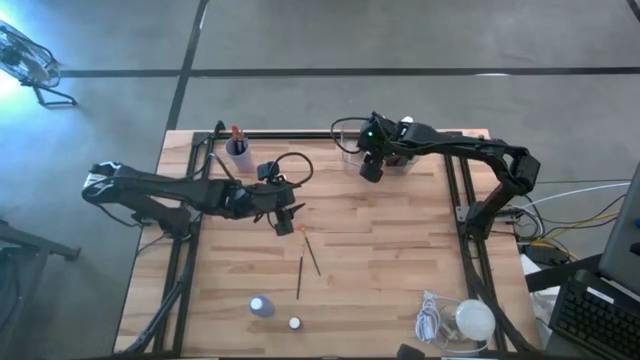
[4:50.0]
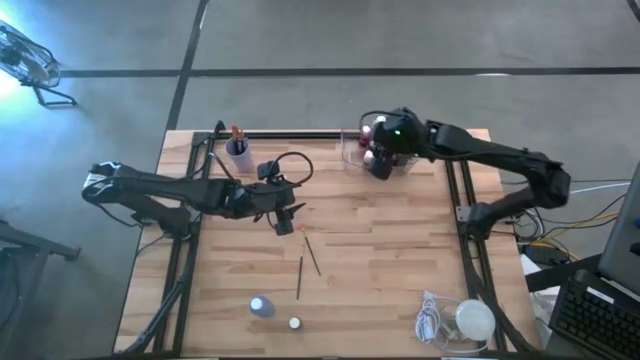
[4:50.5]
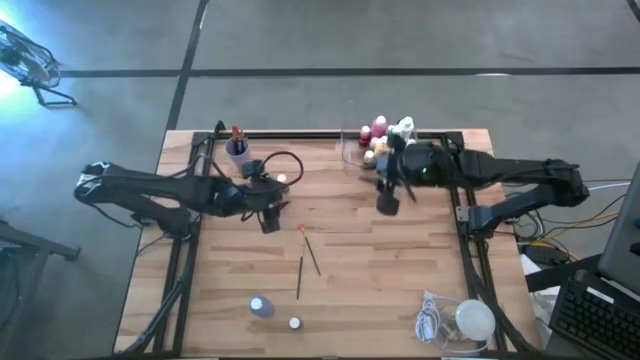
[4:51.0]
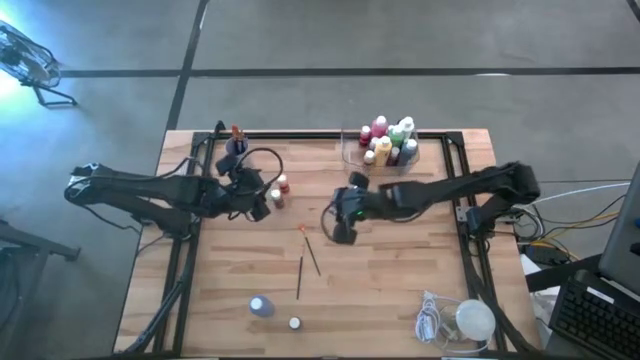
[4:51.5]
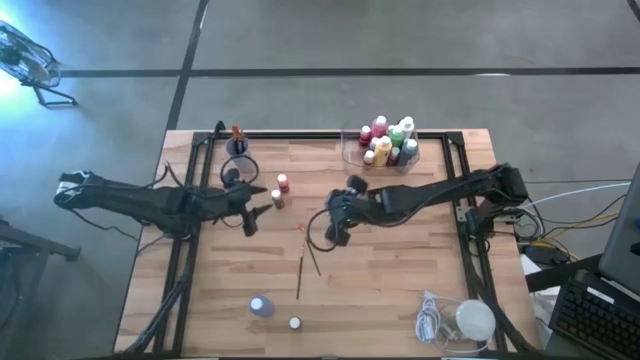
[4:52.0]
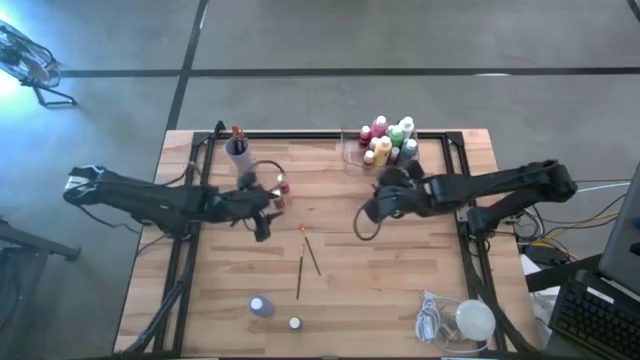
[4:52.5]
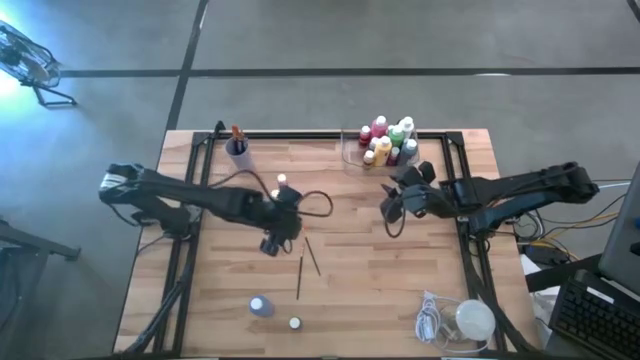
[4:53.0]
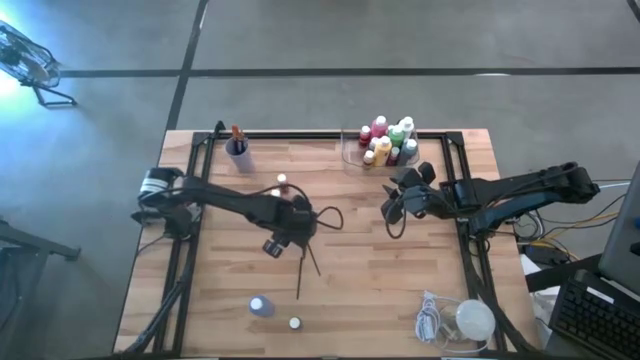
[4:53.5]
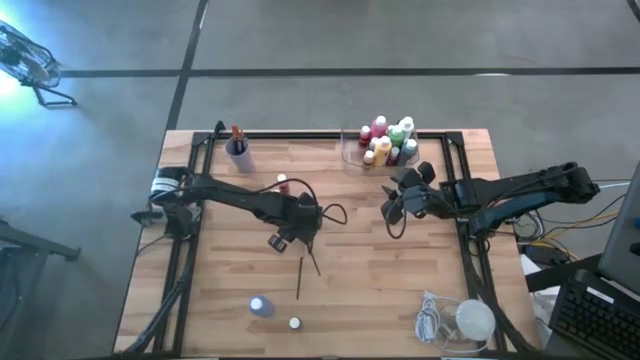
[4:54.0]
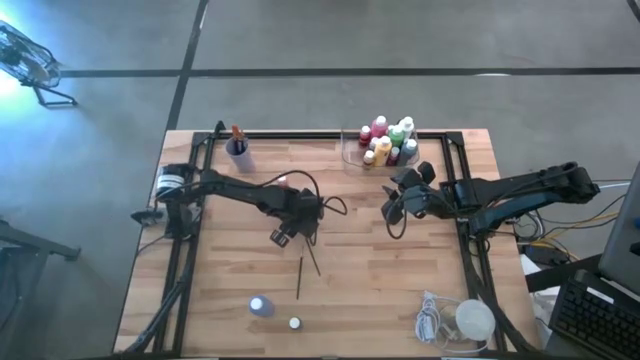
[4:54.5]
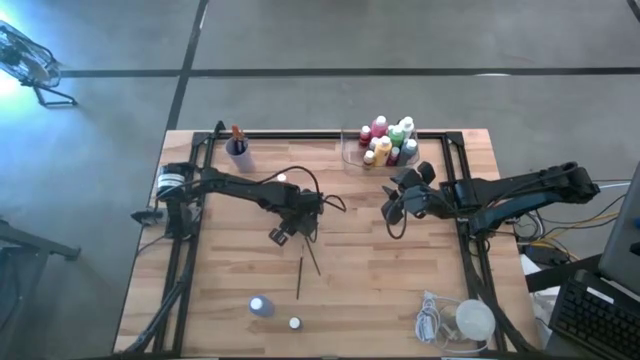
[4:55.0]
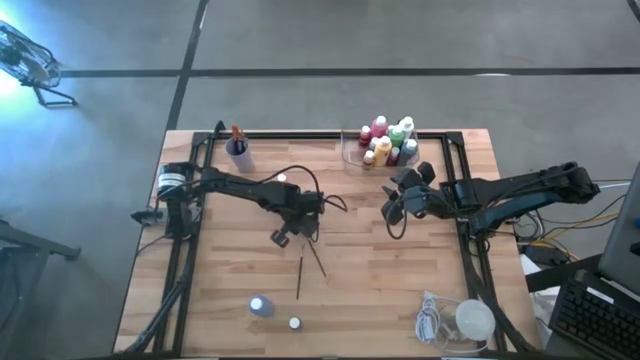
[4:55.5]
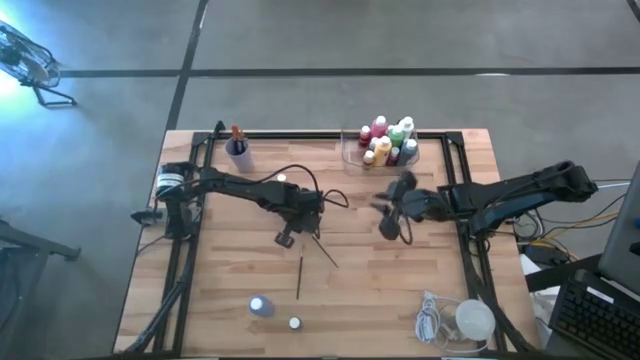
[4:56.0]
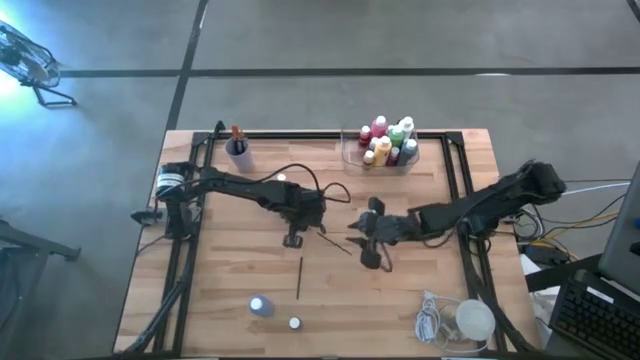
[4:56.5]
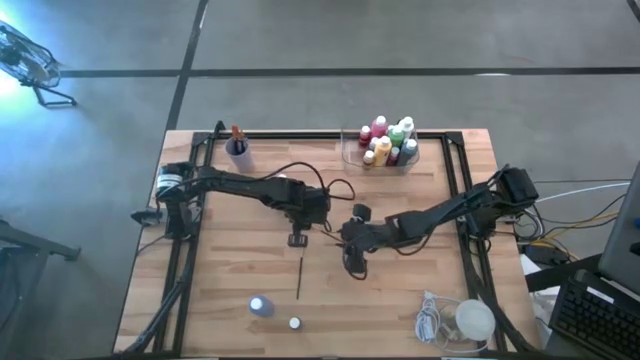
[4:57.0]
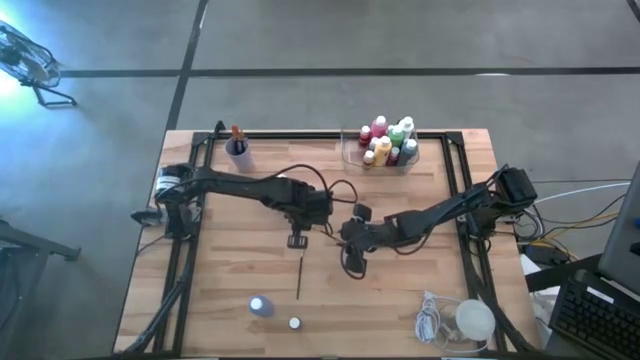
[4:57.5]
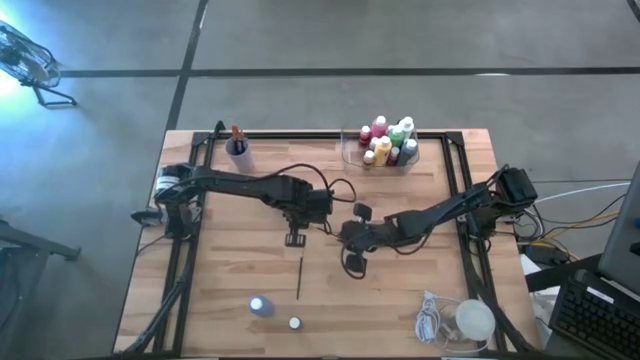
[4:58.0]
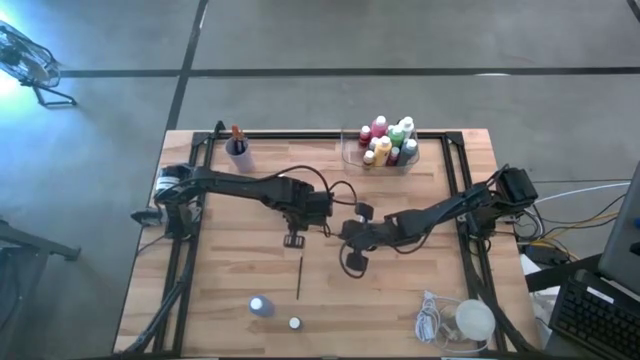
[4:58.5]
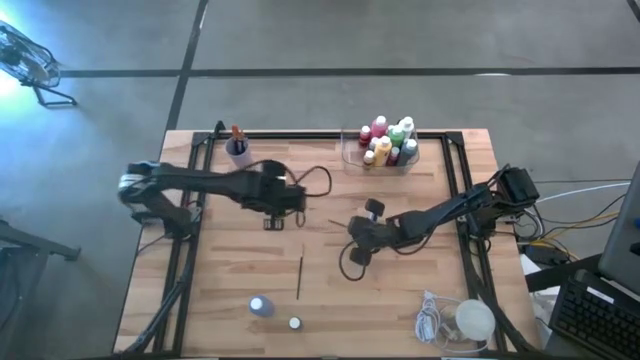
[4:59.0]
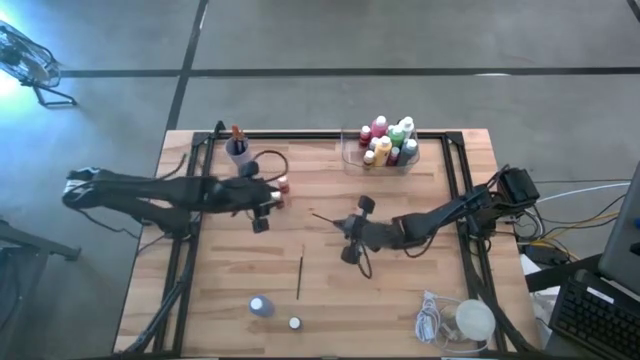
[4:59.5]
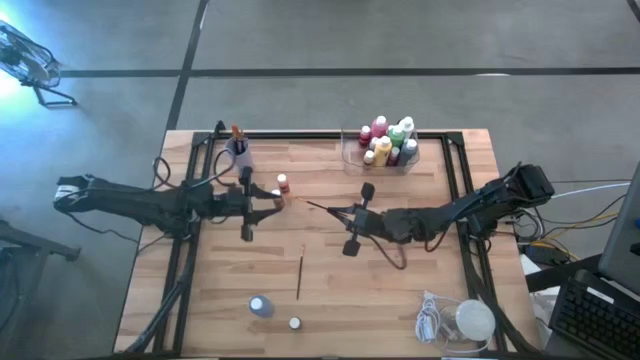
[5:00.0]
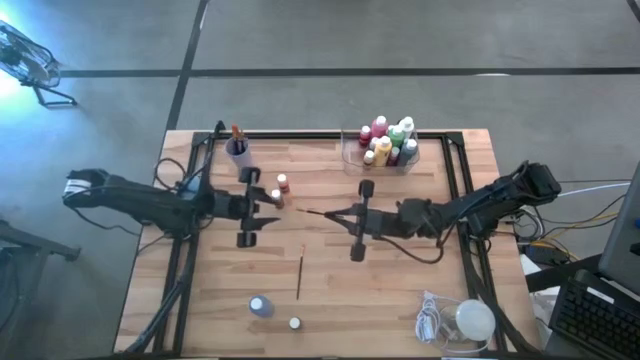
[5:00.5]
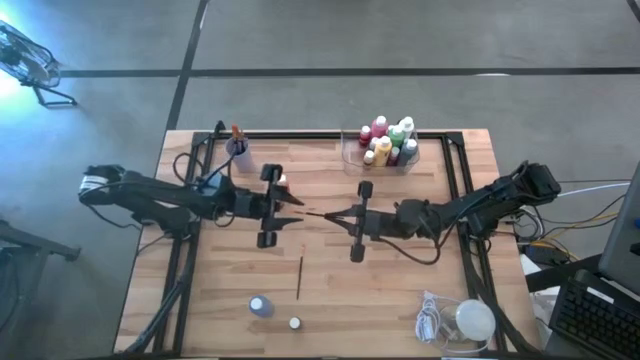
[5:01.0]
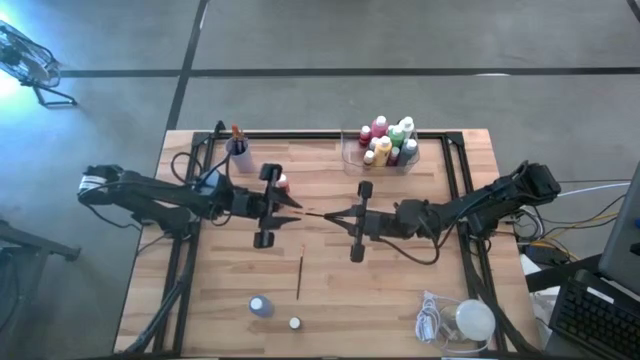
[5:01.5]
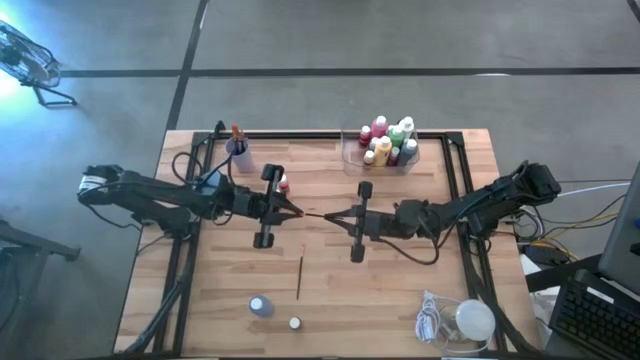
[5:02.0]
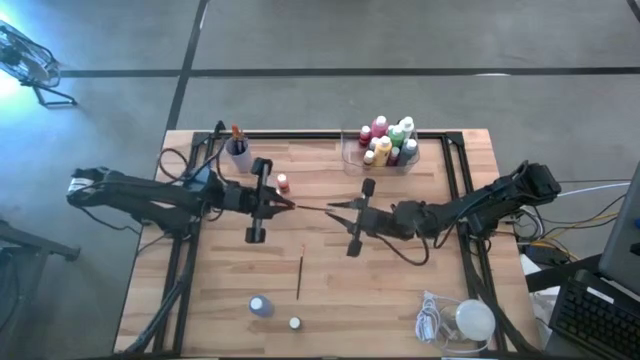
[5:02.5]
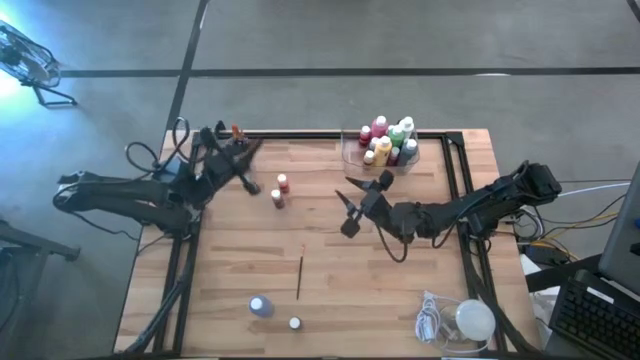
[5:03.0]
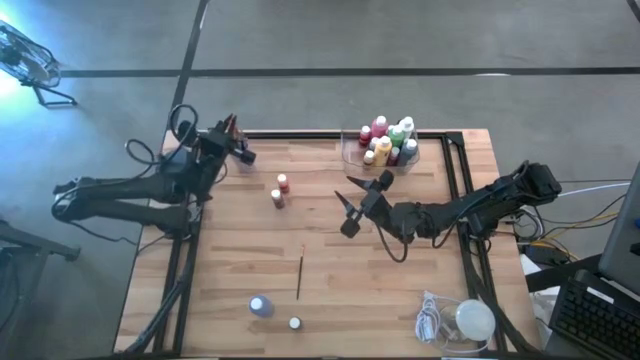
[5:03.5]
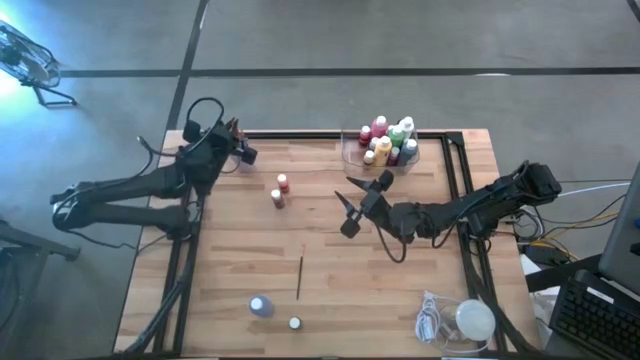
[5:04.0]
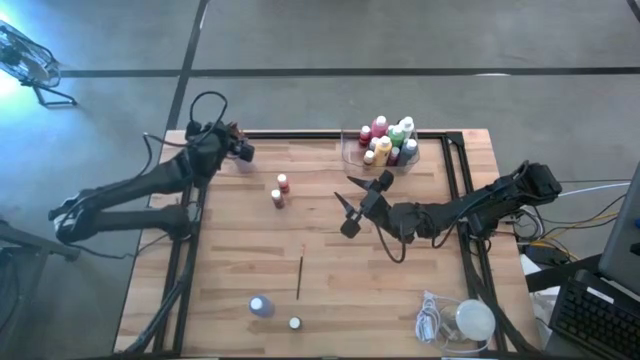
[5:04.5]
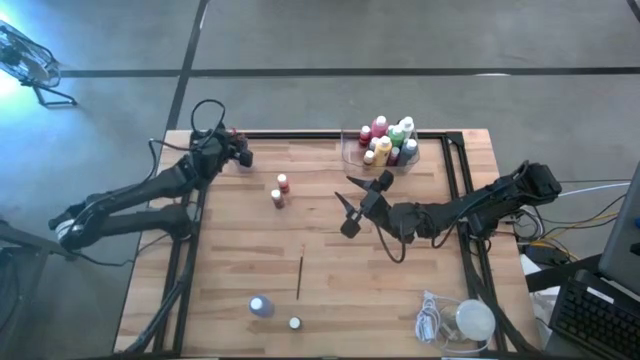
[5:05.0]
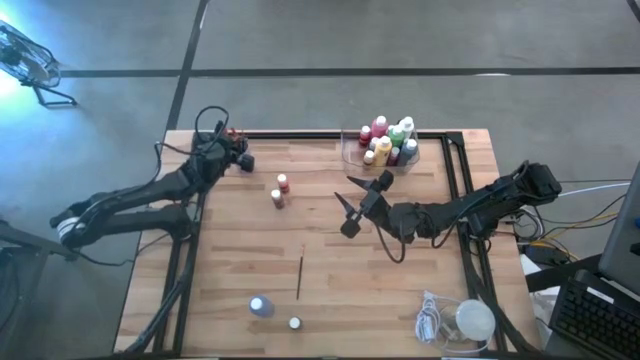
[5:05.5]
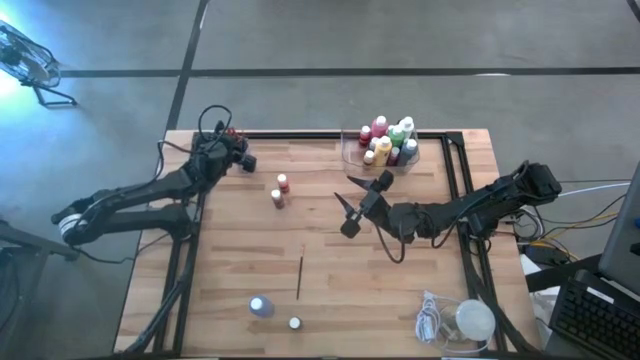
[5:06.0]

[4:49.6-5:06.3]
Task: Pick & Place Paint Supplies
Put the gold paint brush into the violet cup
